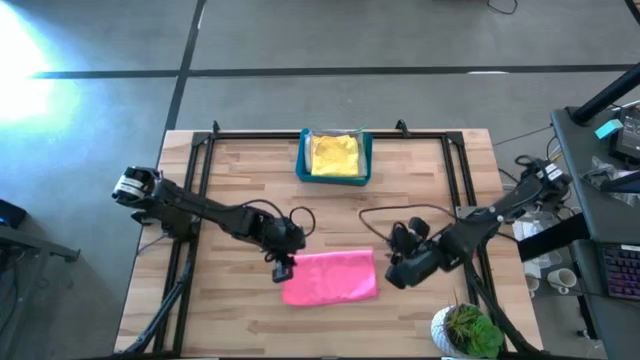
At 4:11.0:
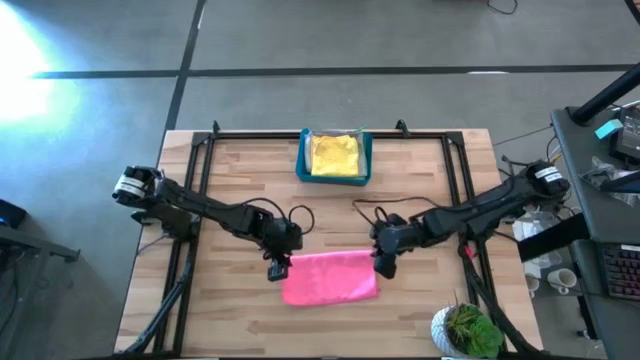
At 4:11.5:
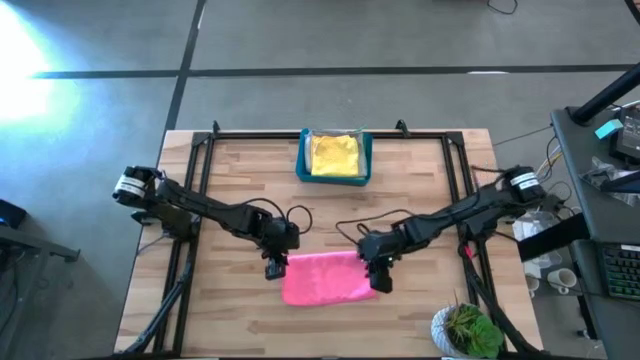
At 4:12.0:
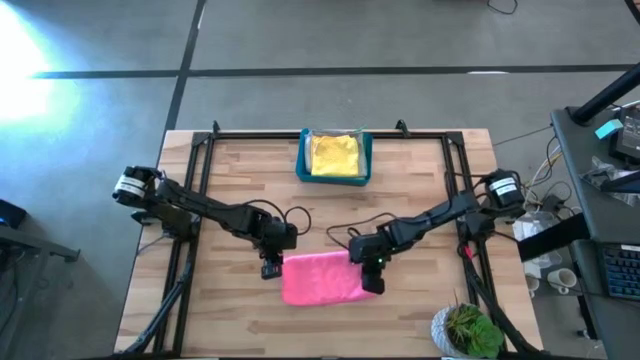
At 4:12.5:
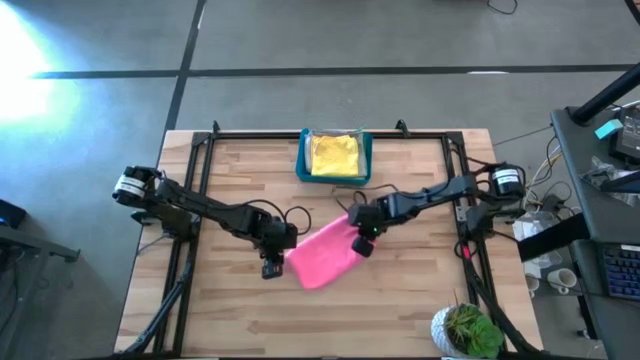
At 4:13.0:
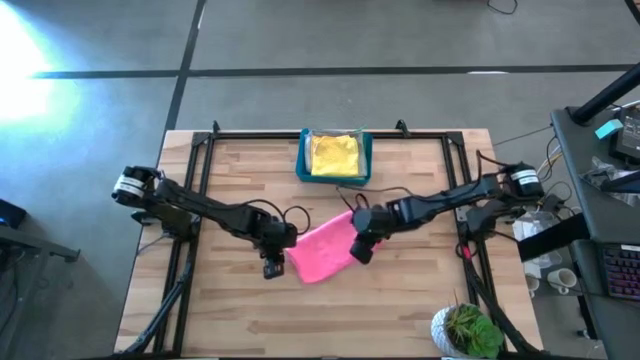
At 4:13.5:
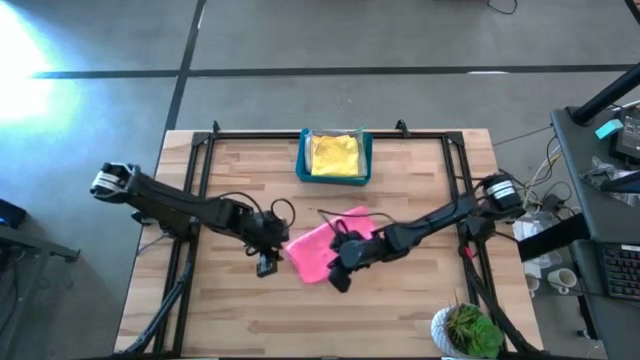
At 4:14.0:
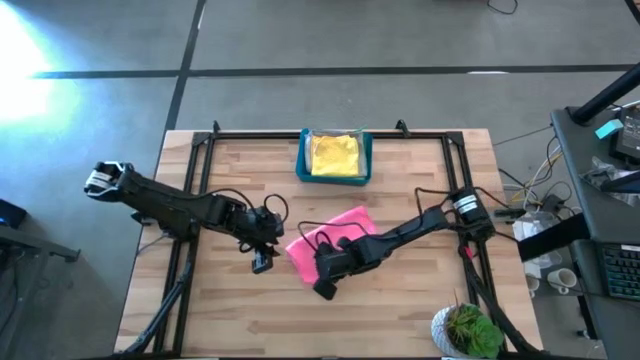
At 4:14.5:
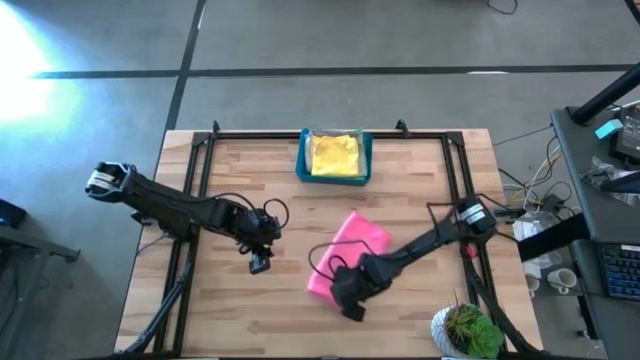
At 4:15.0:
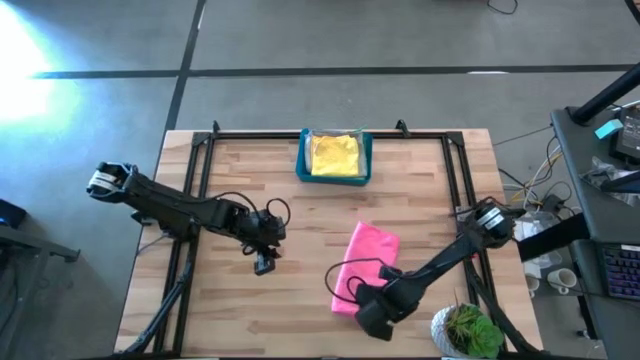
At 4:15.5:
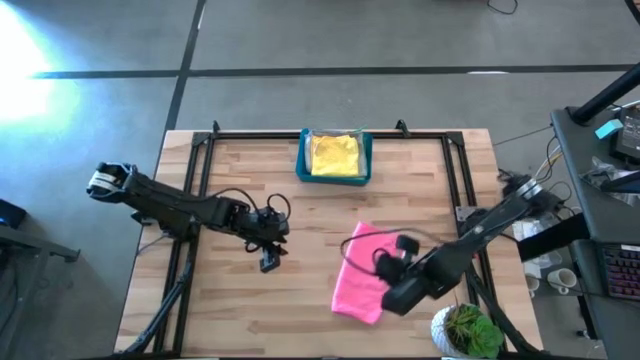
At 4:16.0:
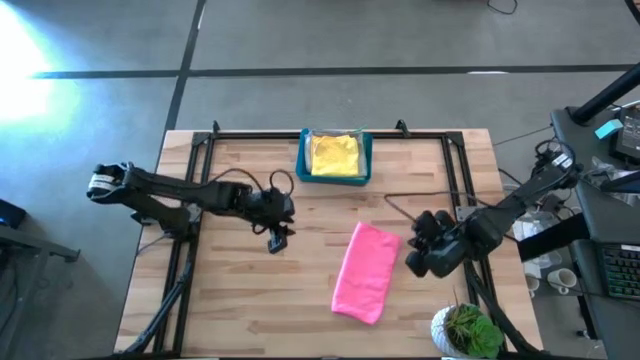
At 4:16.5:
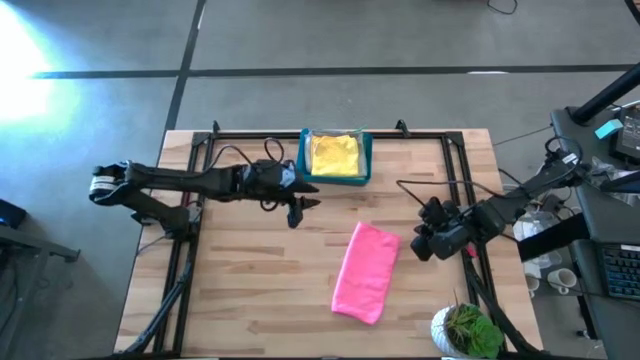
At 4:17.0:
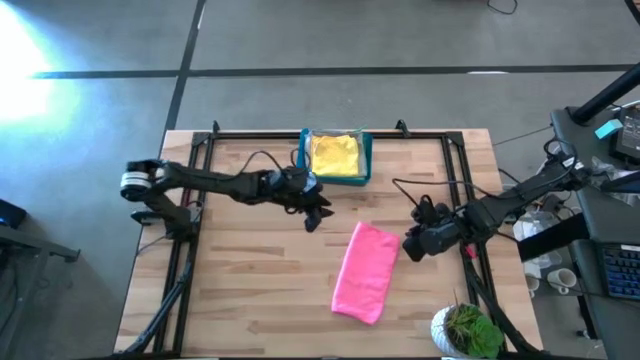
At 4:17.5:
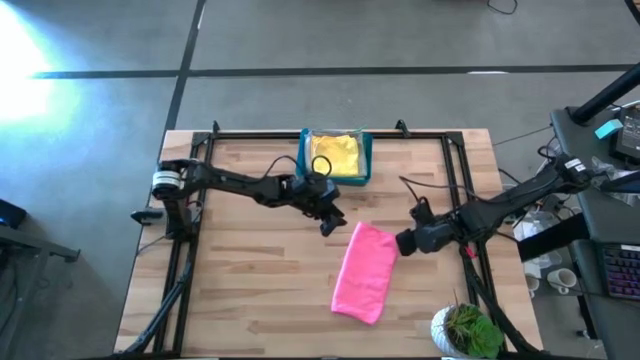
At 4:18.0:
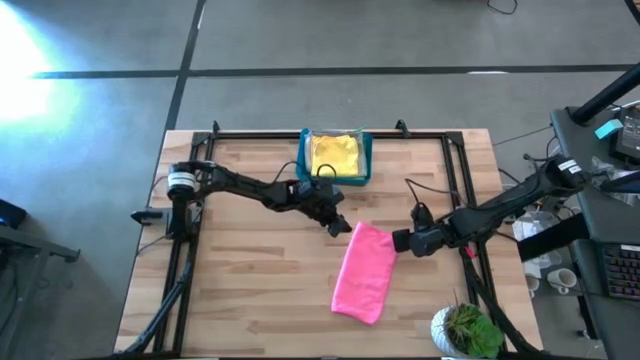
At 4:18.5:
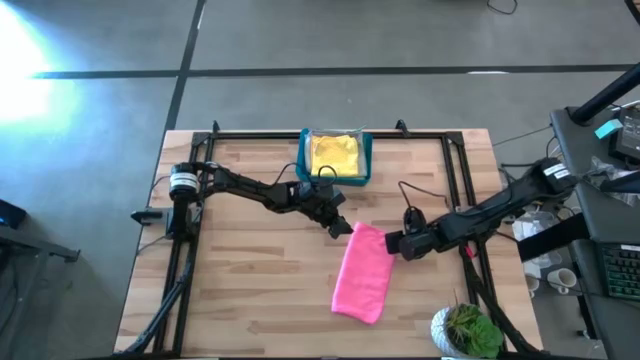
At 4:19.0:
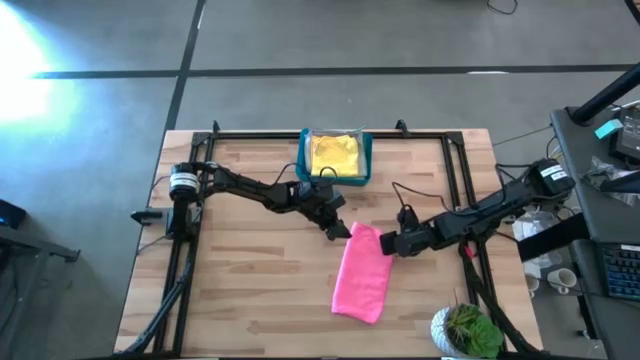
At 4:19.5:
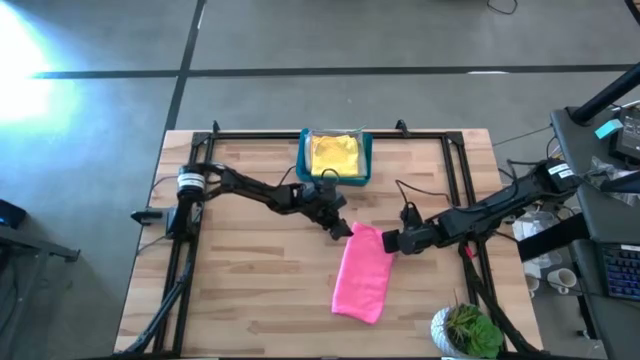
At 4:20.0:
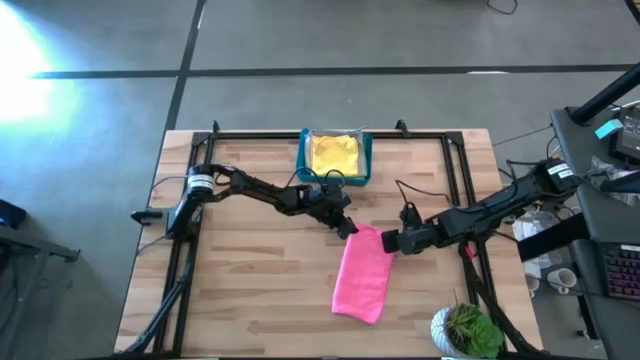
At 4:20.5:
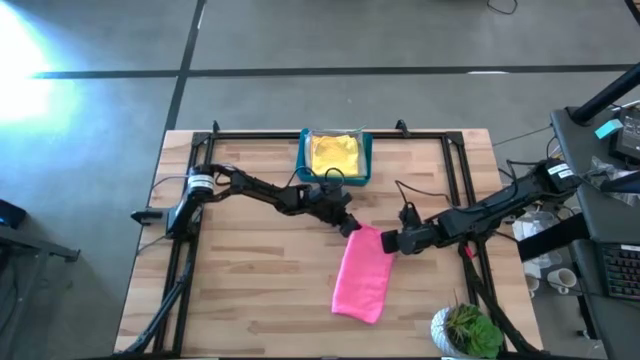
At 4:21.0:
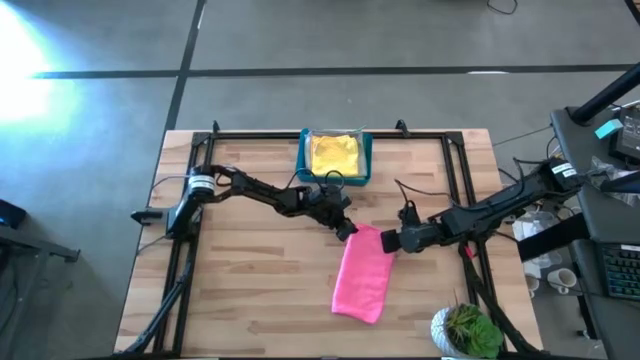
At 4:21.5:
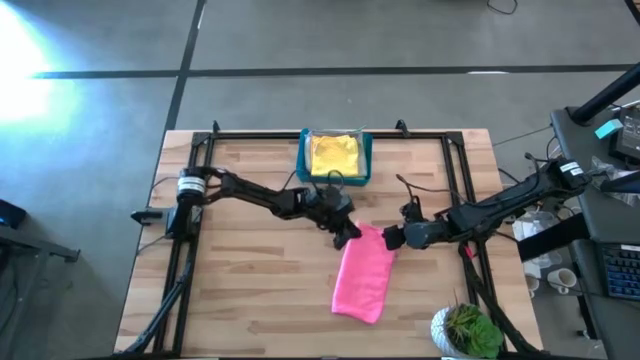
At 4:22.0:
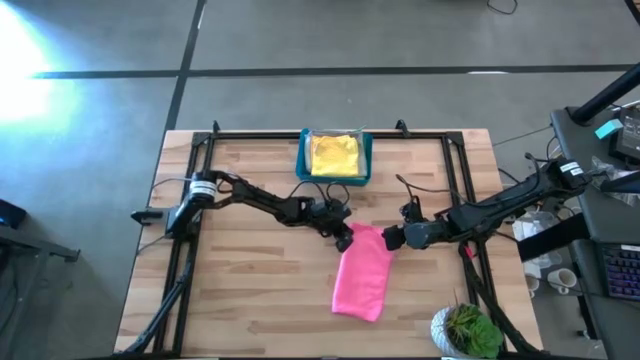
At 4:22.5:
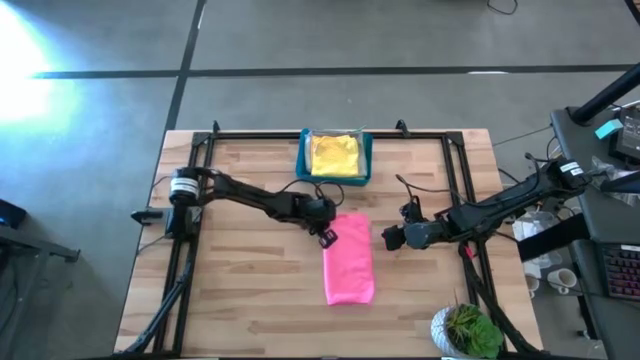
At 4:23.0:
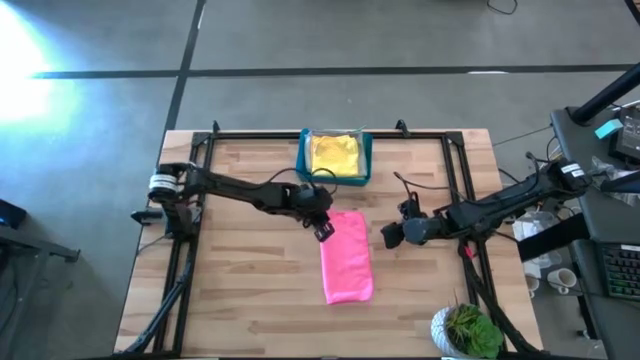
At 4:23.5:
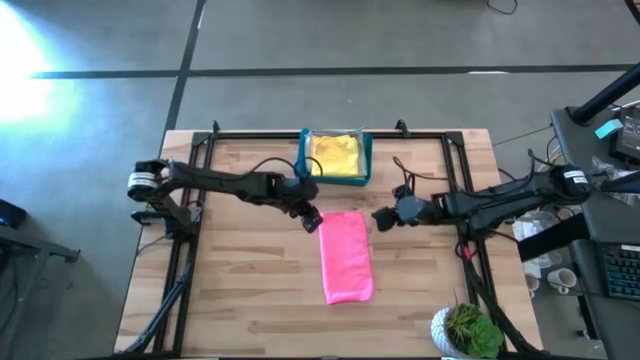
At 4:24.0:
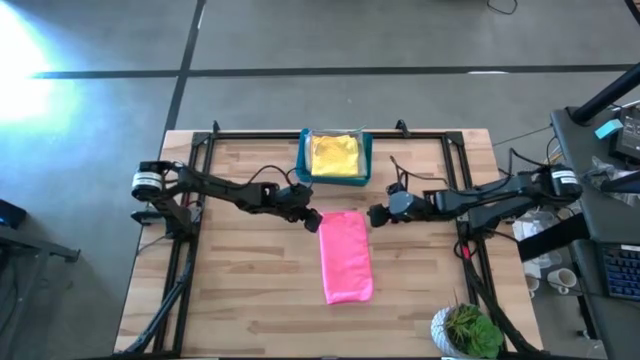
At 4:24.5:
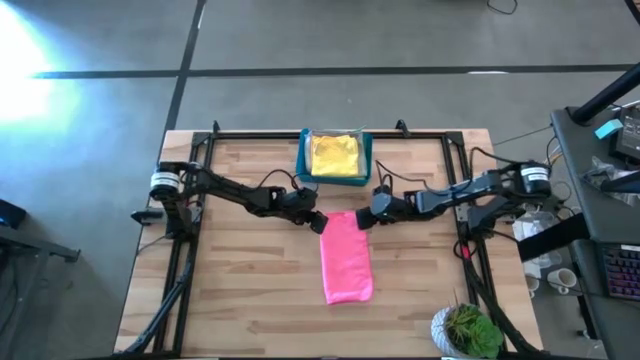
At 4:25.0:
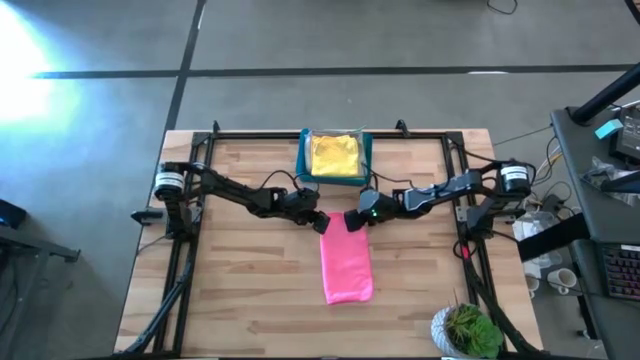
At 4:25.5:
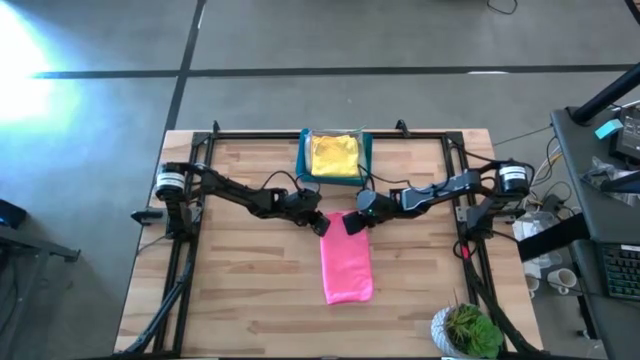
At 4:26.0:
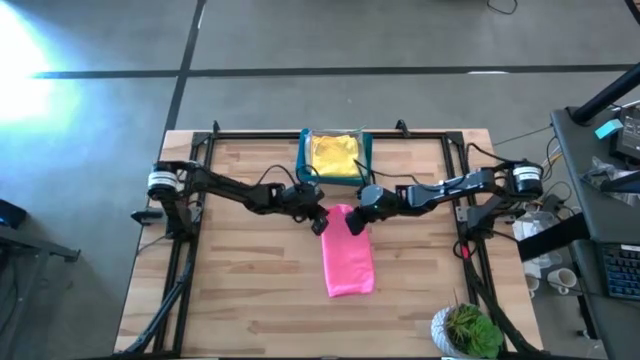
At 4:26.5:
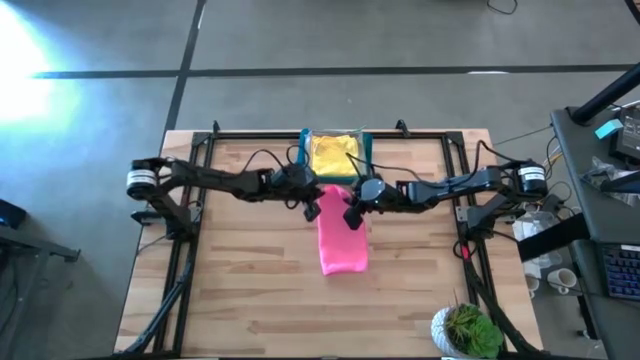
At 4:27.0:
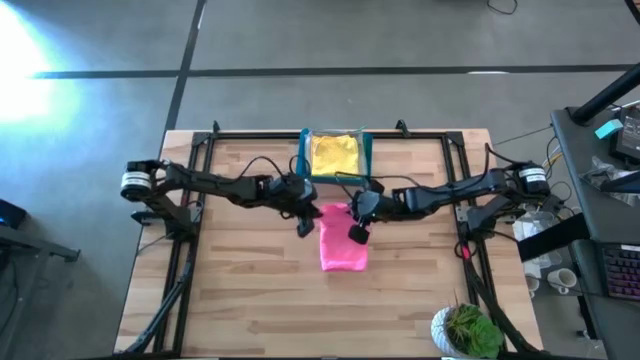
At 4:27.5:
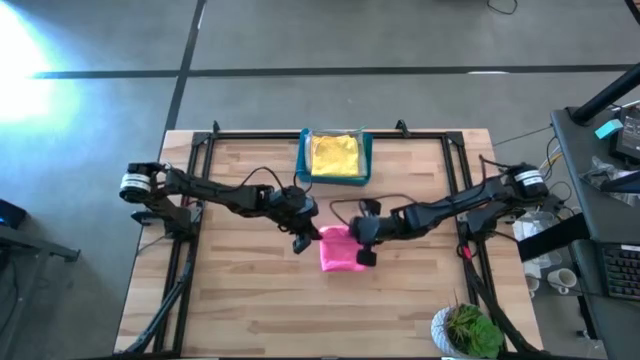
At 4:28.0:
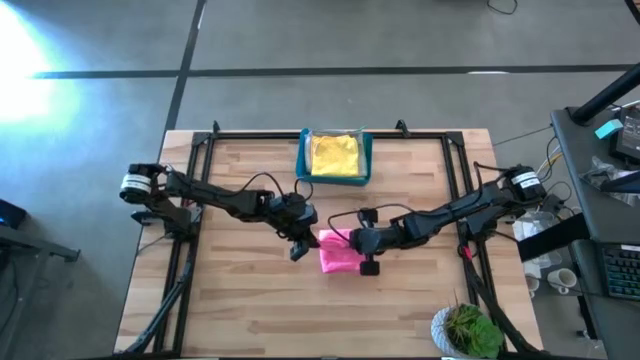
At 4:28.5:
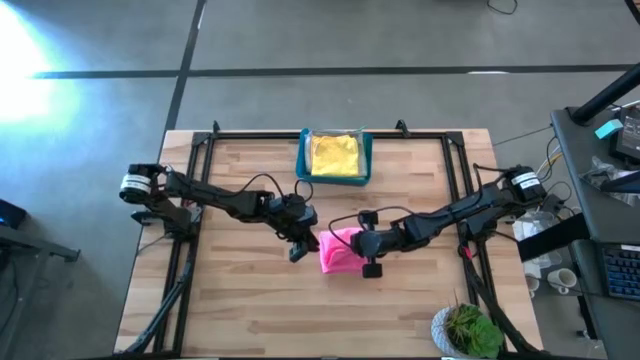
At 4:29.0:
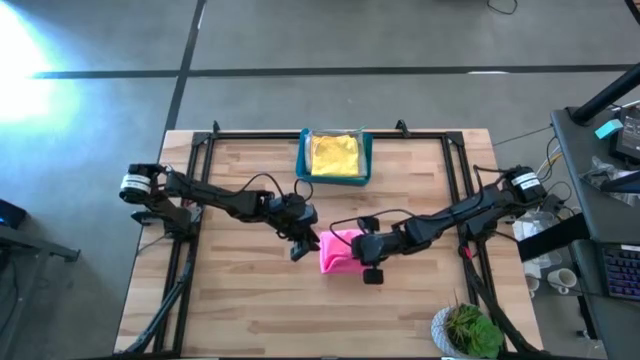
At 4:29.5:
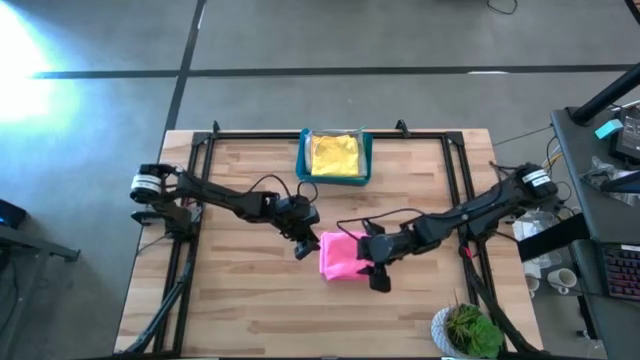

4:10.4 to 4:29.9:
Task: Fold microfiber towels
Fold the pink microfiber cloth
